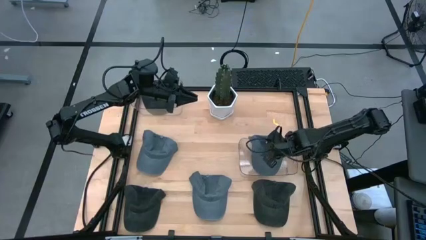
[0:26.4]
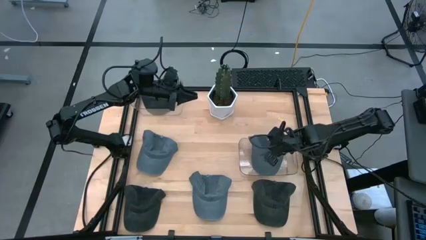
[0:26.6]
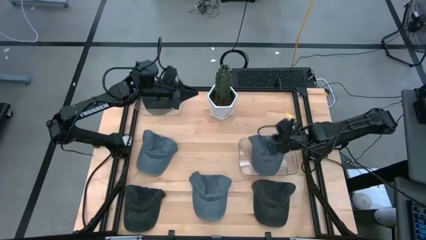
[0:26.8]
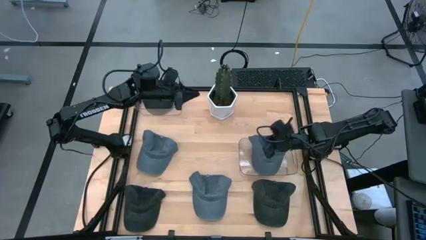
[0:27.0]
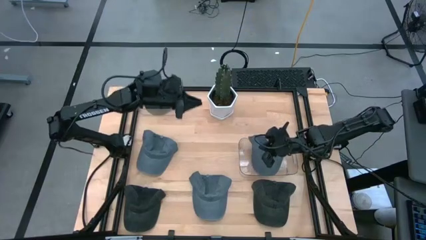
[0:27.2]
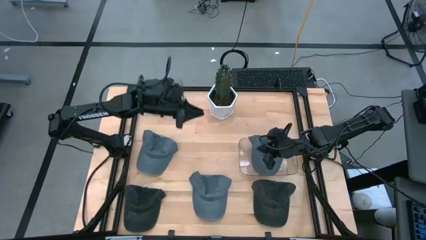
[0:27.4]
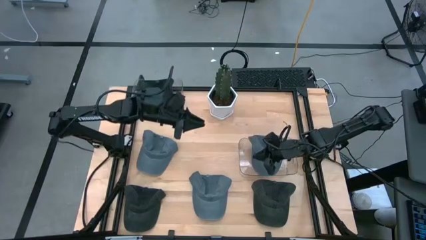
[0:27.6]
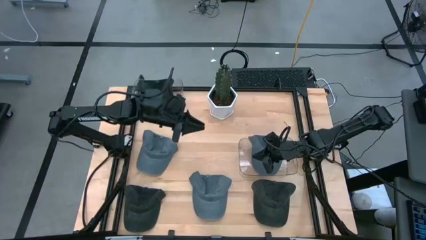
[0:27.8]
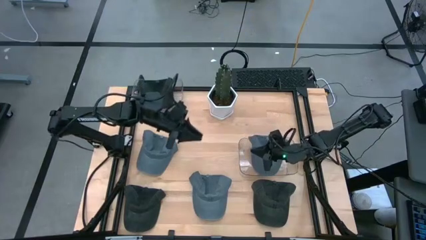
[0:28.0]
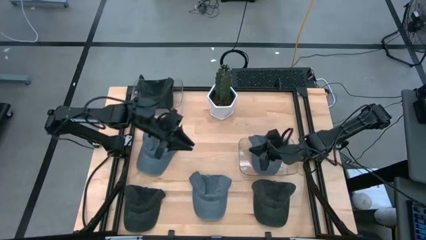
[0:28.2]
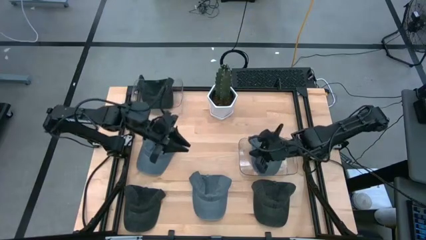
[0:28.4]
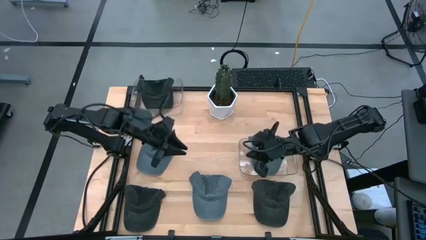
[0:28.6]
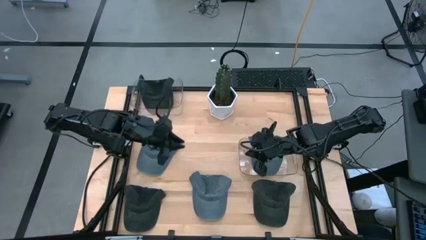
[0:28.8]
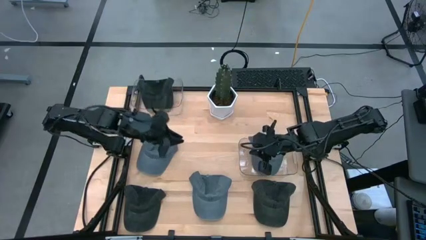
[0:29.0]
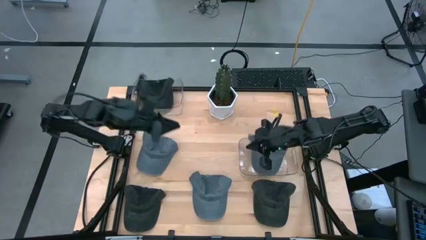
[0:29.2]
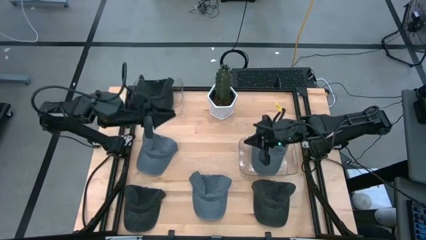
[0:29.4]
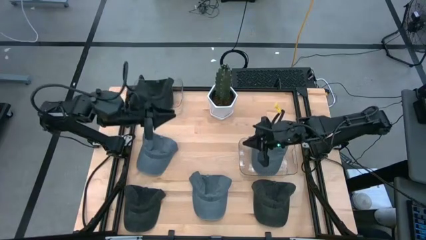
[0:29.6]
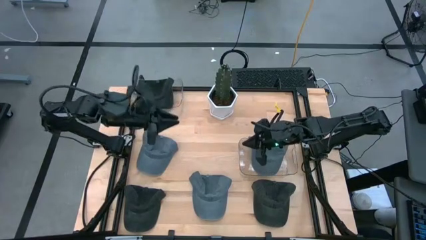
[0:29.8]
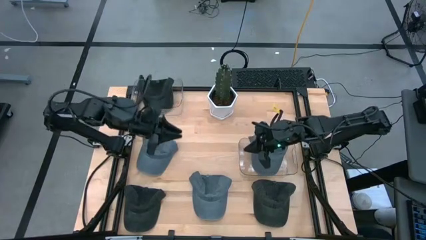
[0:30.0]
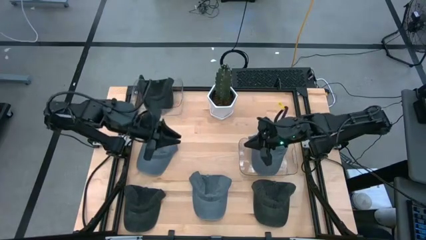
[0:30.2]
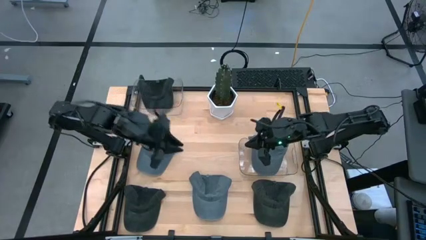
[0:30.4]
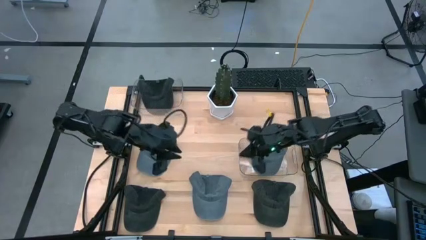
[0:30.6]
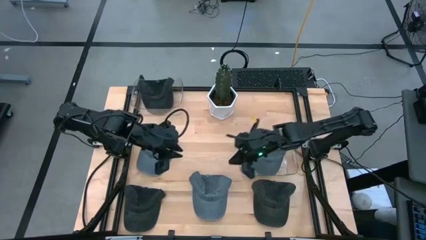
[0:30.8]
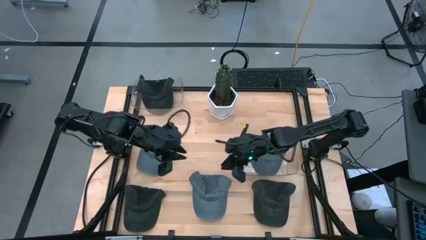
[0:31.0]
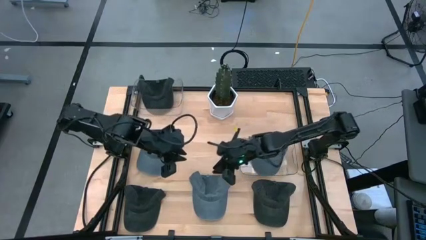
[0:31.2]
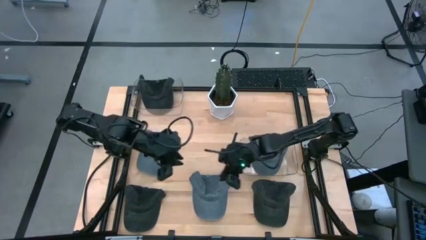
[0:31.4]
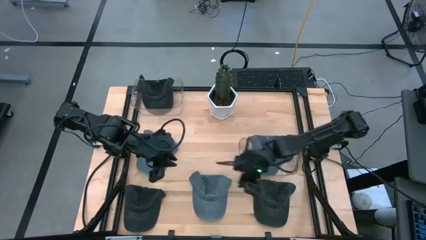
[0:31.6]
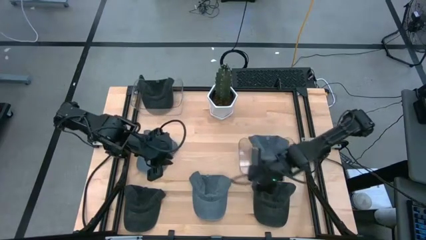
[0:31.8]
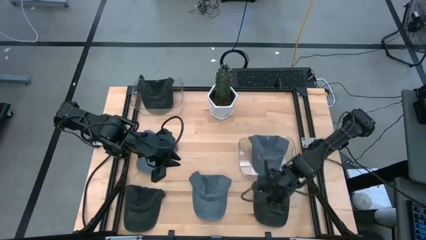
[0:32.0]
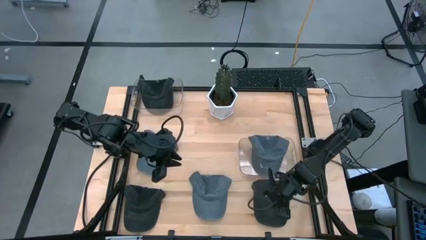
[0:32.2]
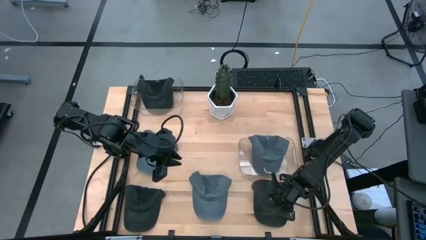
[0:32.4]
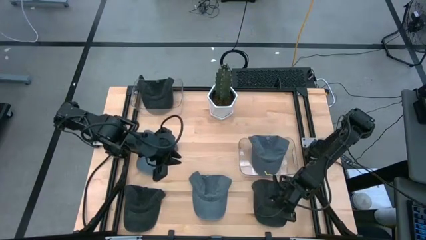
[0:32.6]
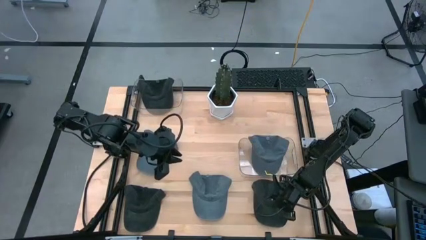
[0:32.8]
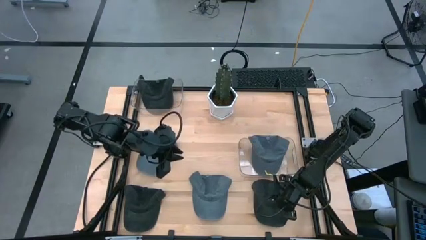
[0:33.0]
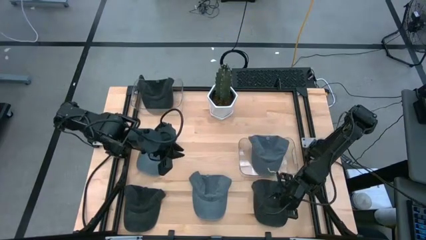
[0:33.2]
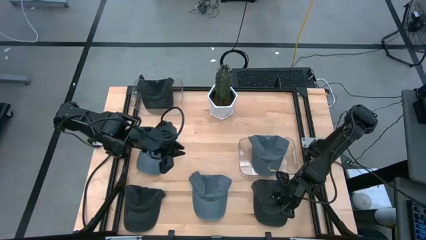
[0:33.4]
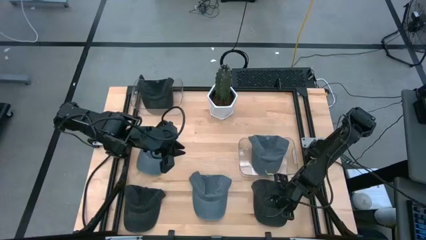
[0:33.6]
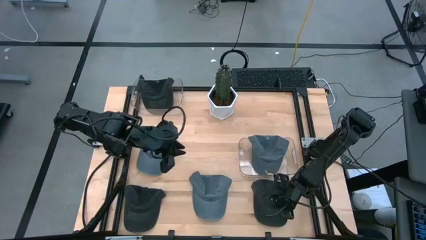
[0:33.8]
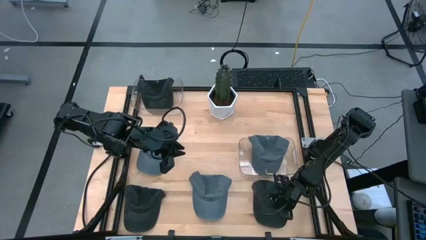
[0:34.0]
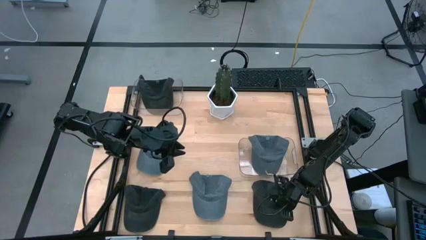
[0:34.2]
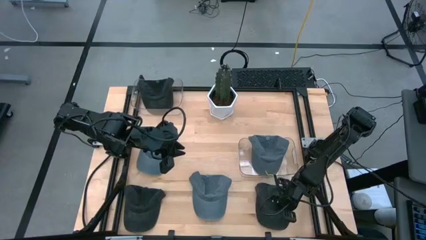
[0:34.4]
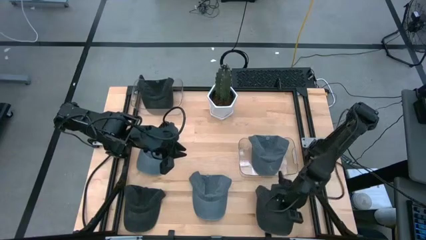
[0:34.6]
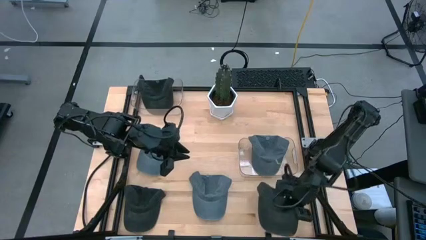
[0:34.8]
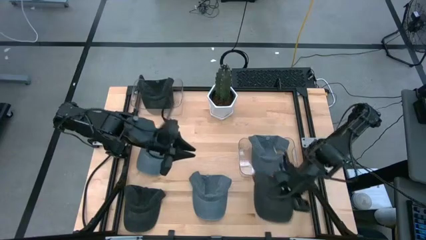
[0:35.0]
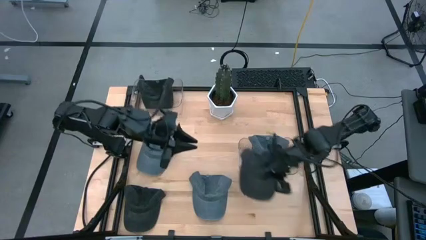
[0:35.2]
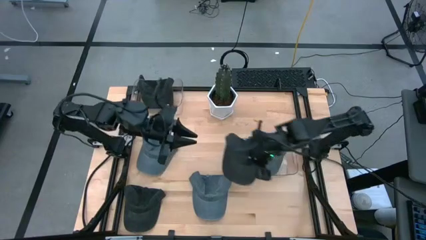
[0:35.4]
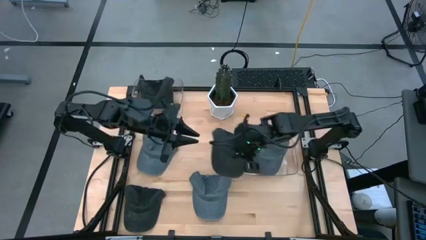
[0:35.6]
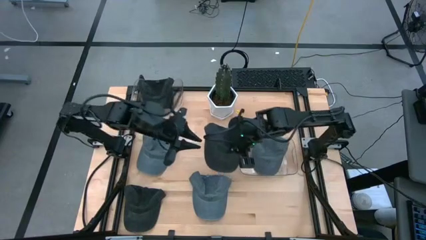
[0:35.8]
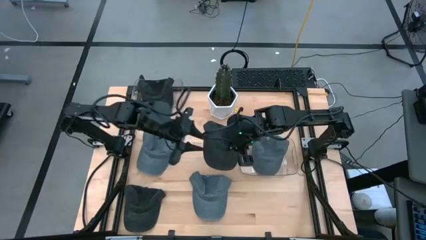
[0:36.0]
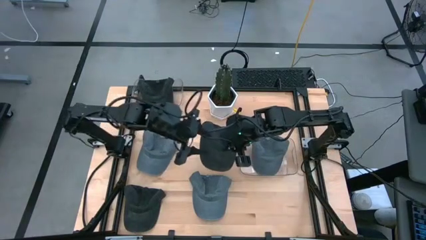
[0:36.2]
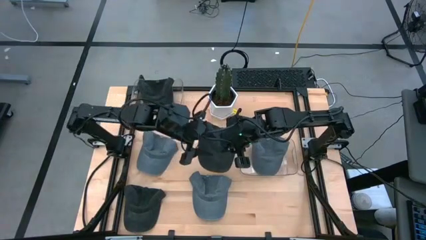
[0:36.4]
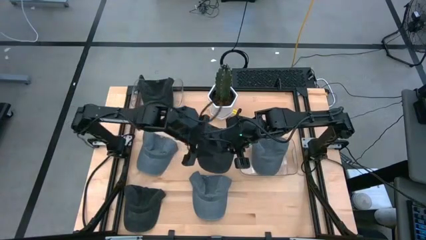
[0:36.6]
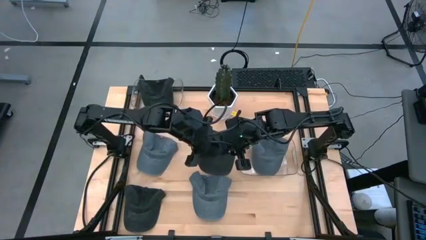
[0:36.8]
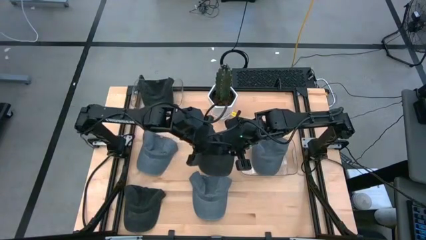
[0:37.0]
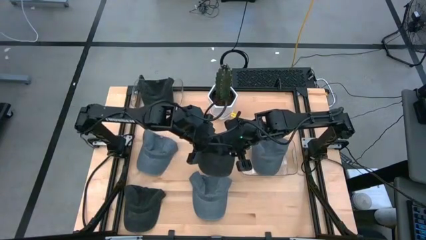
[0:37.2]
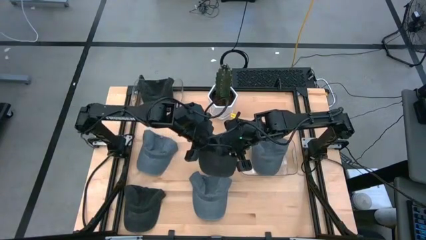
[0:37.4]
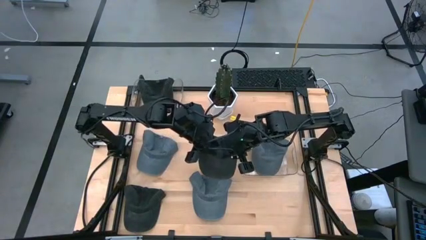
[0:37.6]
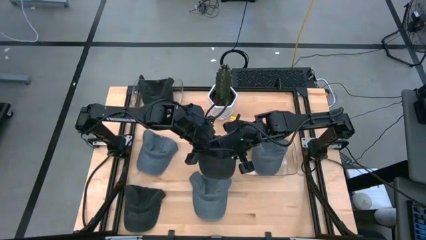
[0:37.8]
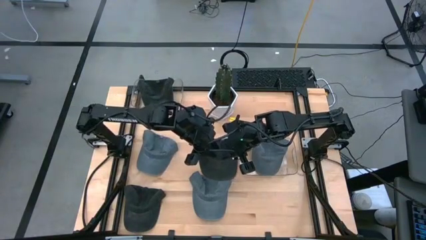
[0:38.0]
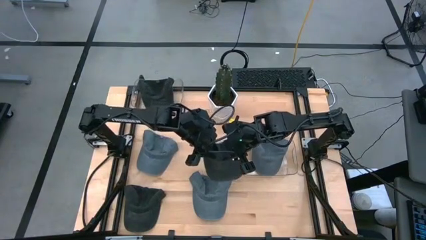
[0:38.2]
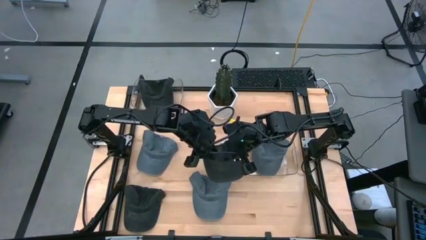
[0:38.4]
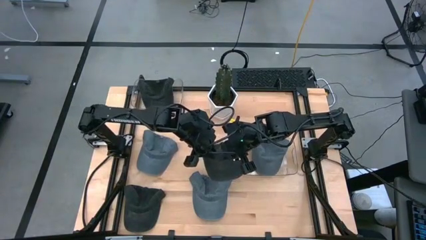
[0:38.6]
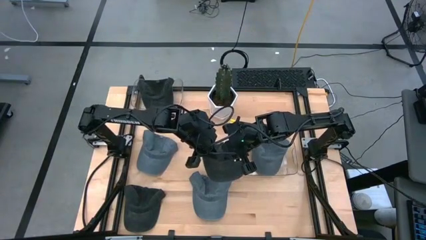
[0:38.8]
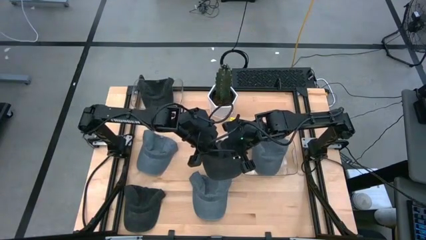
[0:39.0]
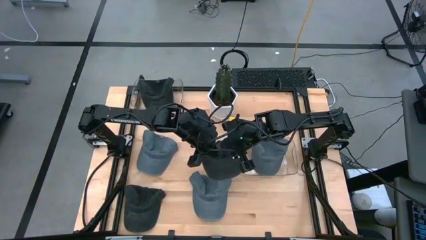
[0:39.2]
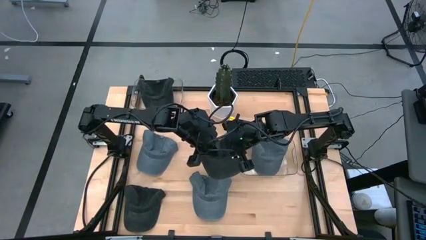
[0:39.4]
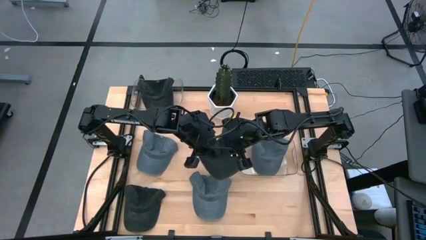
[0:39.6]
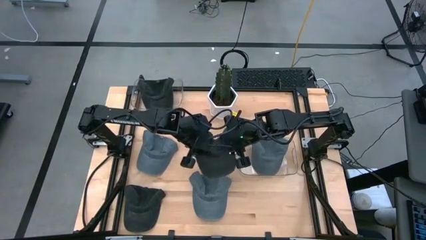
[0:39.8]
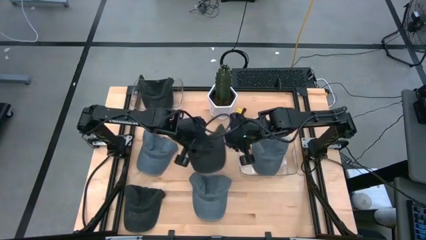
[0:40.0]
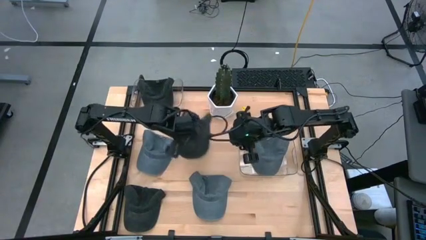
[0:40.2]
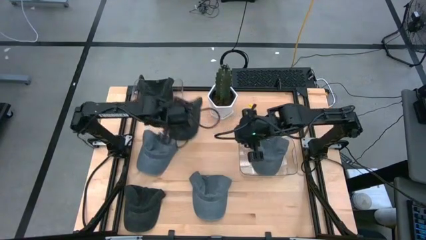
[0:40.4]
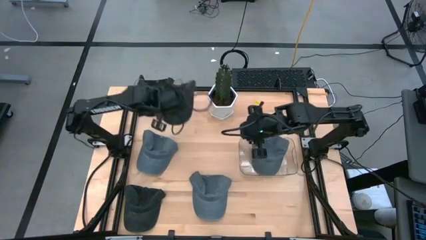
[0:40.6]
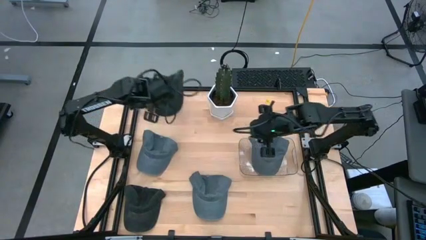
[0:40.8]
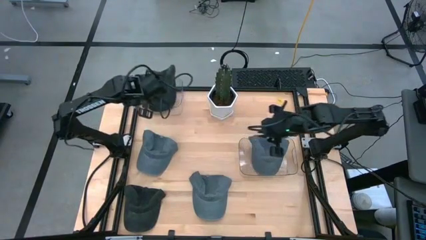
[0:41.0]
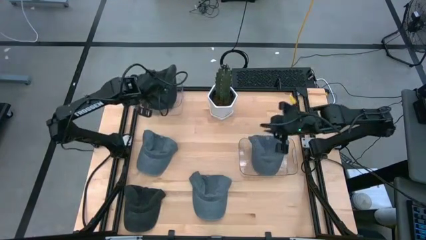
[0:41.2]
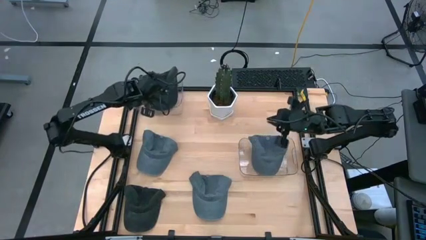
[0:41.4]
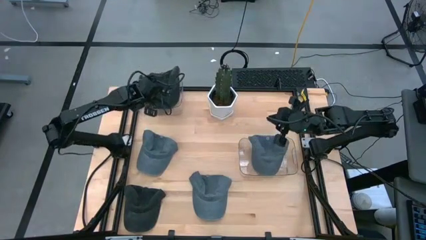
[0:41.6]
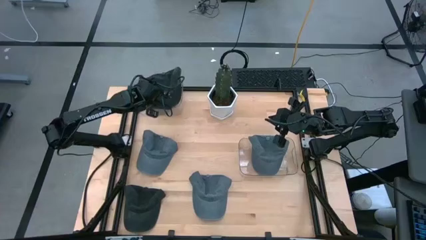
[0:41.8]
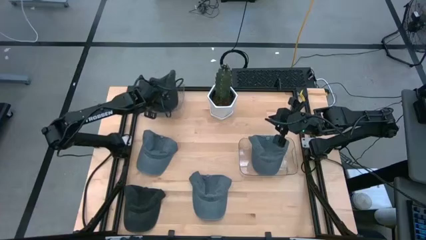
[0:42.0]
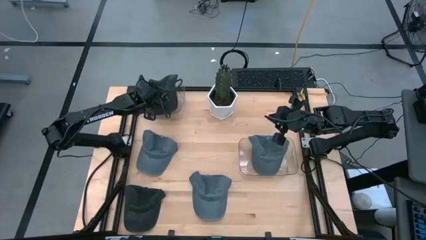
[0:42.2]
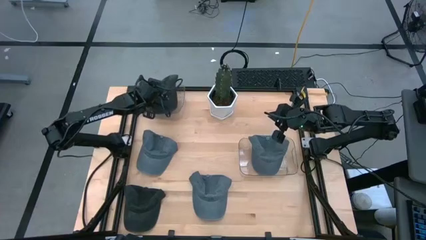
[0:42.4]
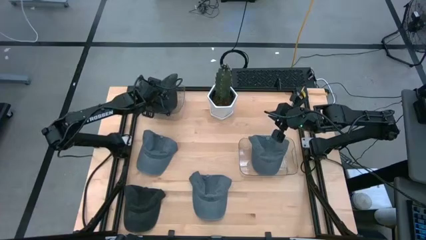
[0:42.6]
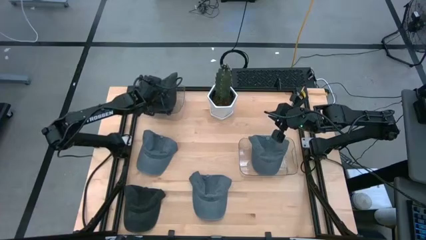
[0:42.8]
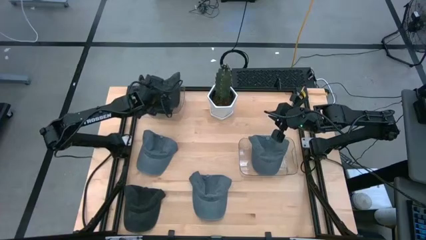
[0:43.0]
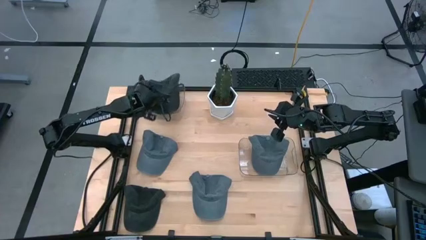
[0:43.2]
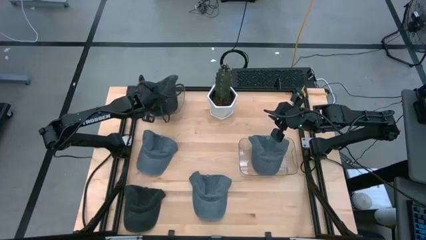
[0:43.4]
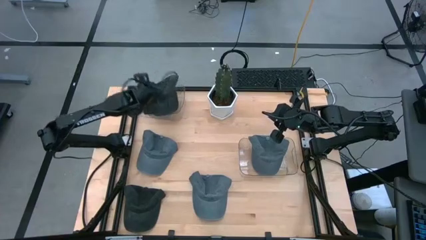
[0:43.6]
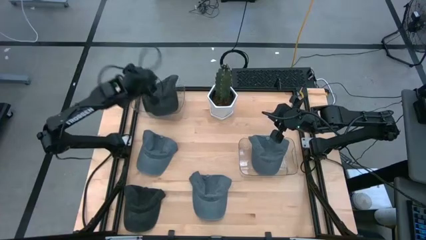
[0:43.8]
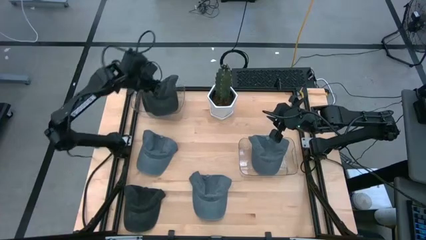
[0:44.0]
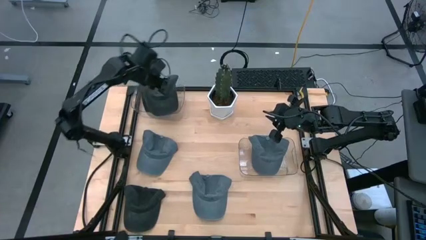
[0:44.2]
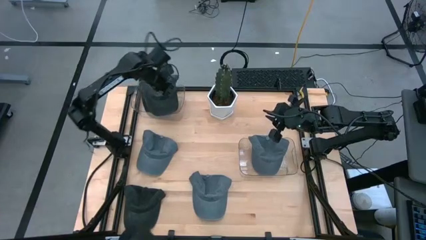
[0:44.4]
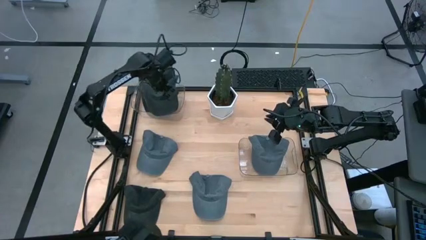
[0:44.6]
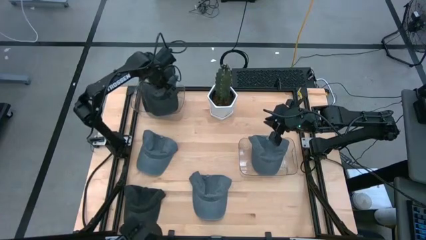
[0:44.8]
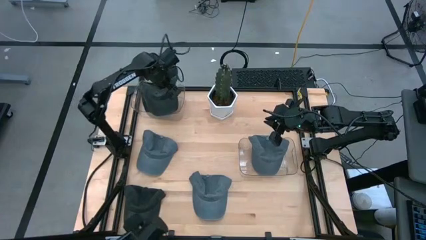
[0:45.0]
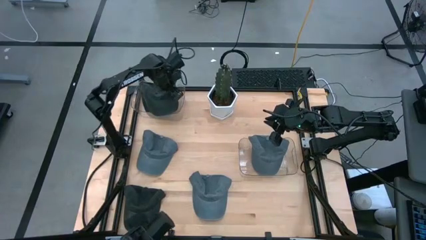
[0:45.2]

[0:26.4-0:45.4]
Task: Pick & Place hat
Put the right black cap into the top transparent bin
